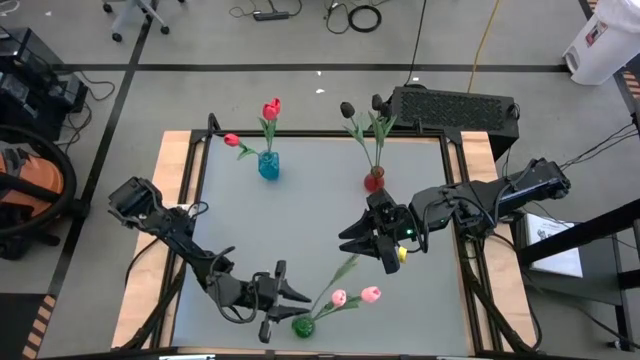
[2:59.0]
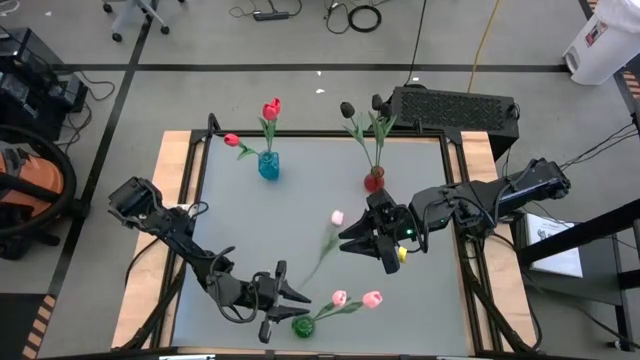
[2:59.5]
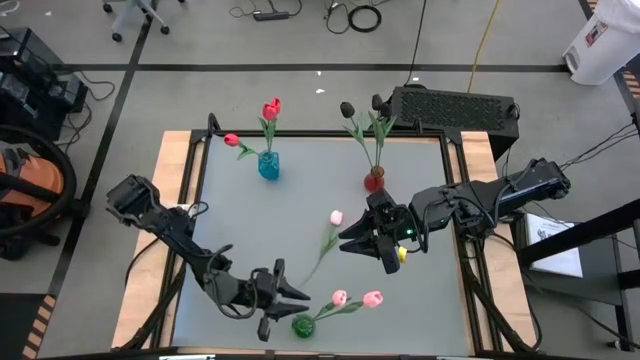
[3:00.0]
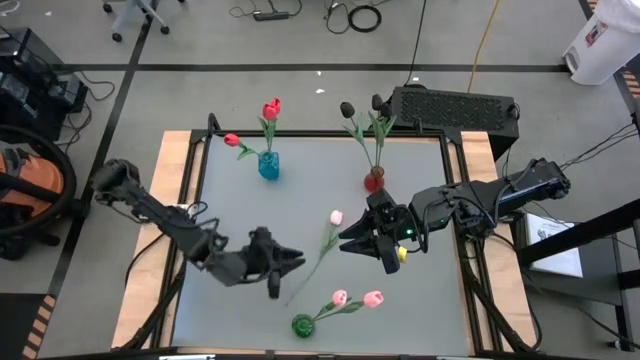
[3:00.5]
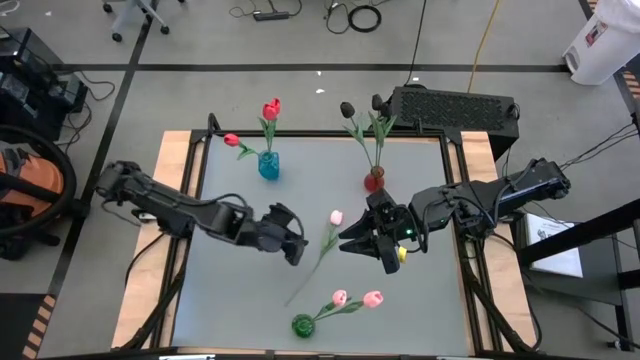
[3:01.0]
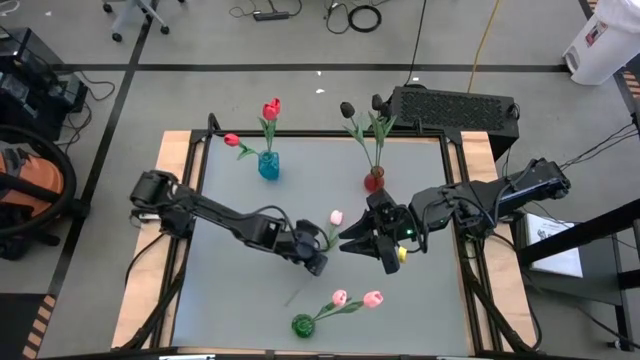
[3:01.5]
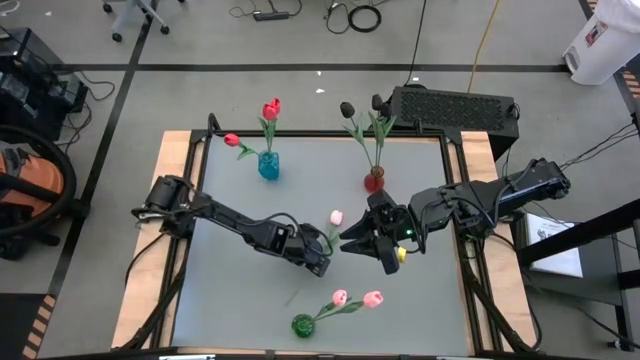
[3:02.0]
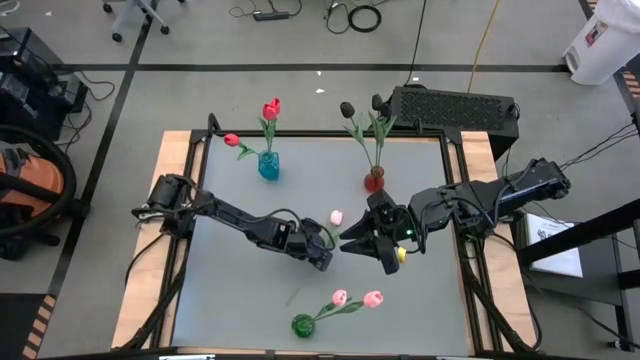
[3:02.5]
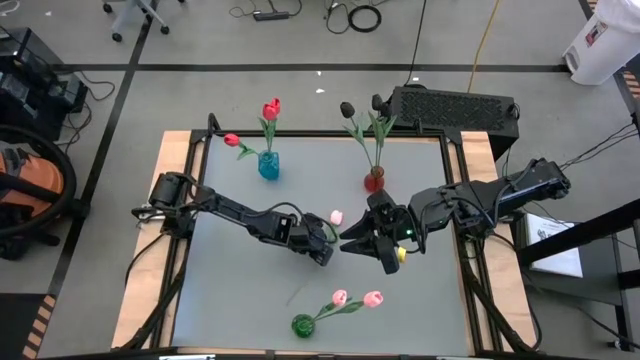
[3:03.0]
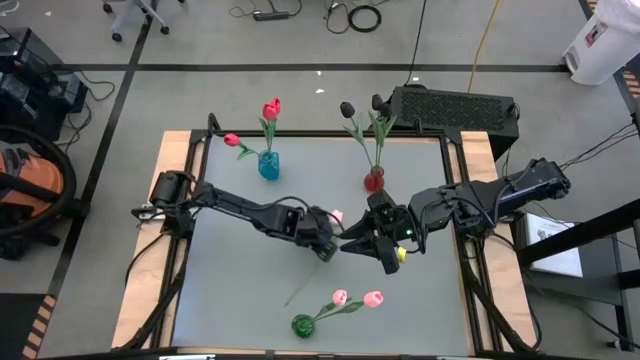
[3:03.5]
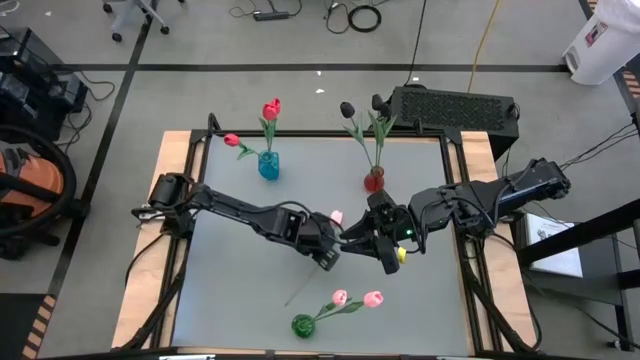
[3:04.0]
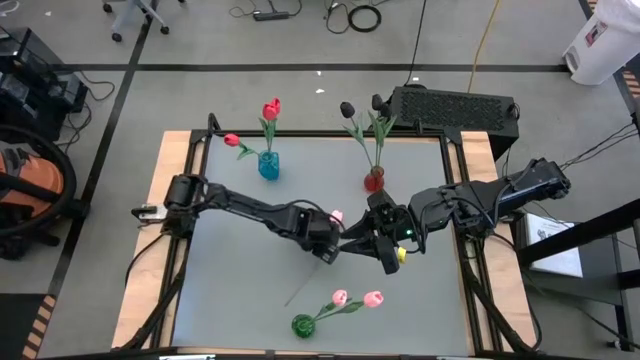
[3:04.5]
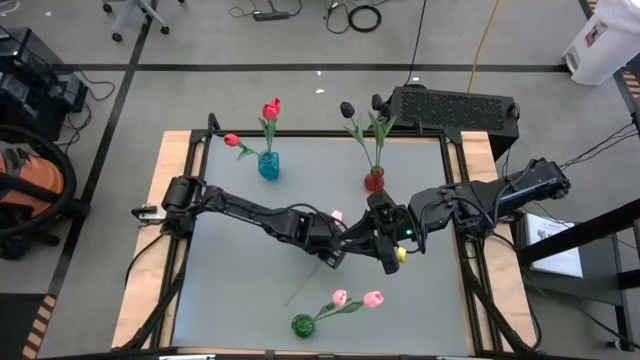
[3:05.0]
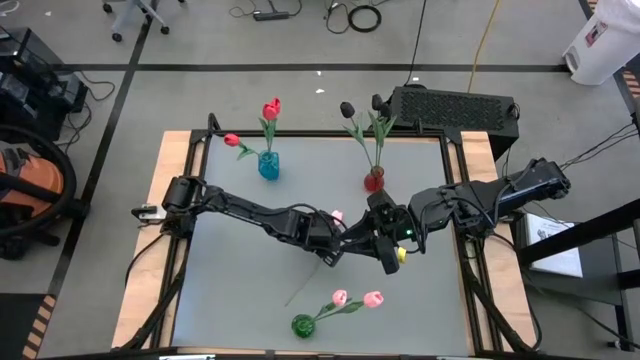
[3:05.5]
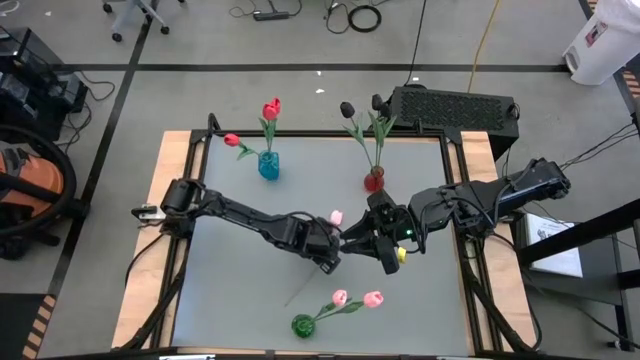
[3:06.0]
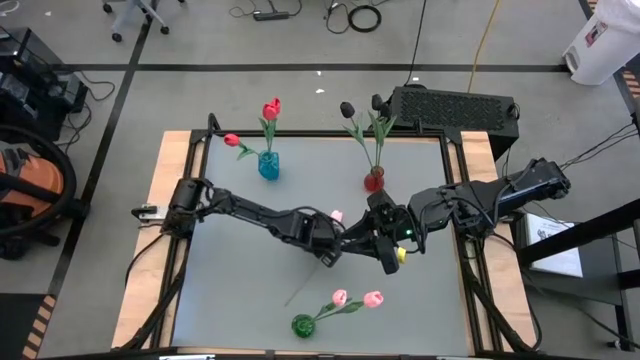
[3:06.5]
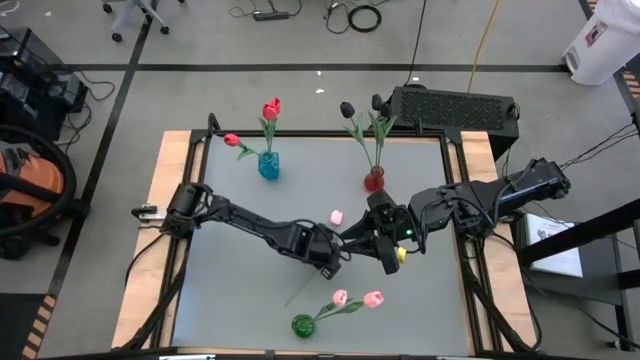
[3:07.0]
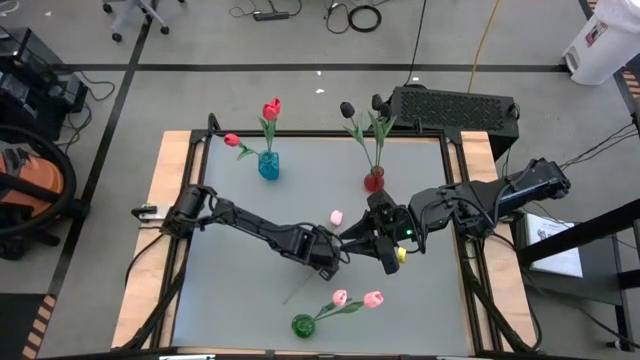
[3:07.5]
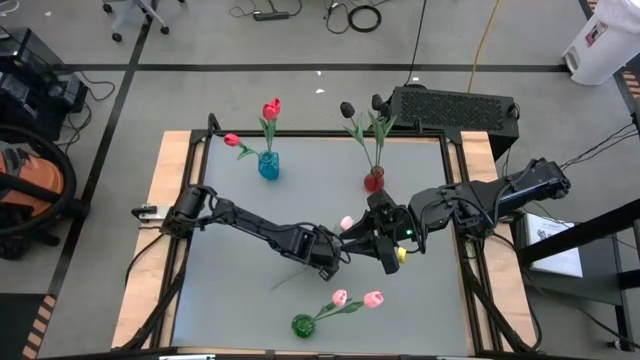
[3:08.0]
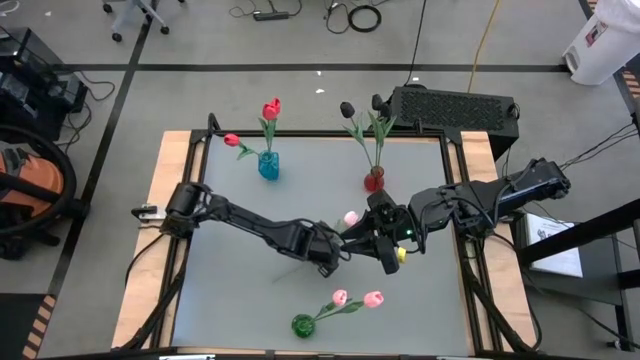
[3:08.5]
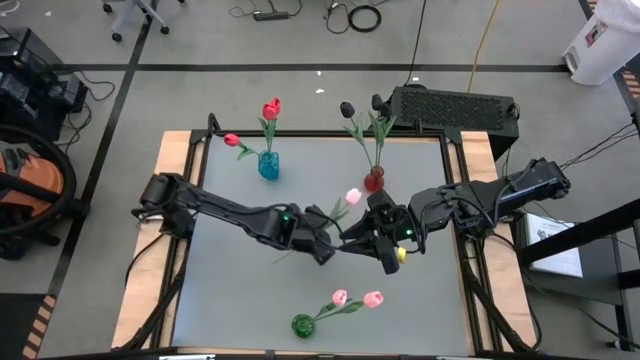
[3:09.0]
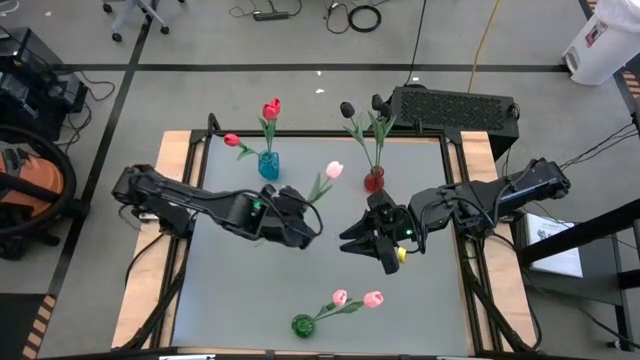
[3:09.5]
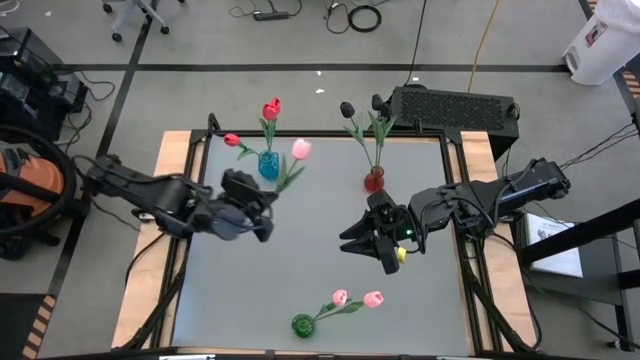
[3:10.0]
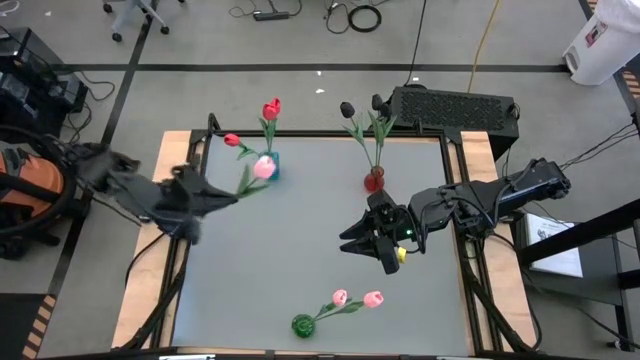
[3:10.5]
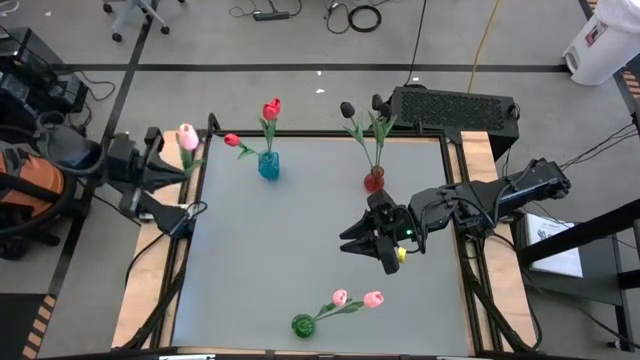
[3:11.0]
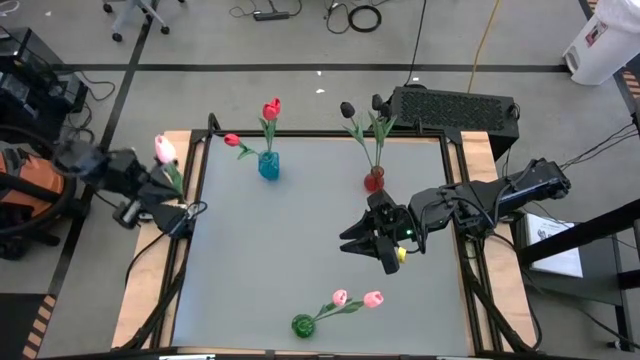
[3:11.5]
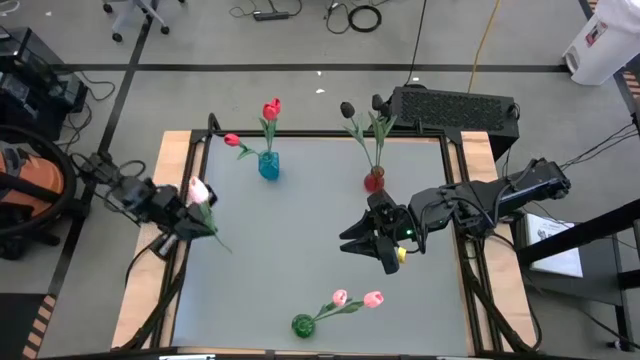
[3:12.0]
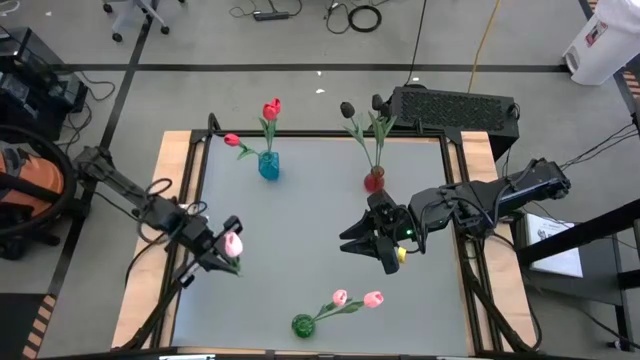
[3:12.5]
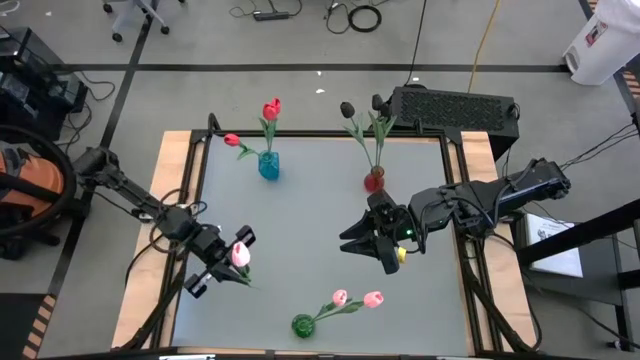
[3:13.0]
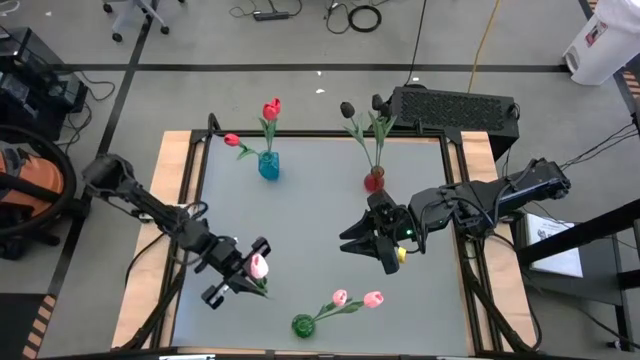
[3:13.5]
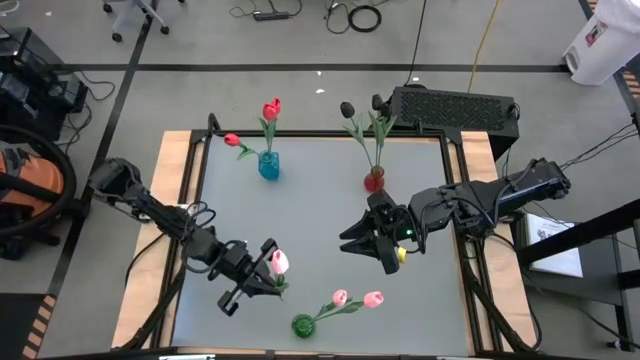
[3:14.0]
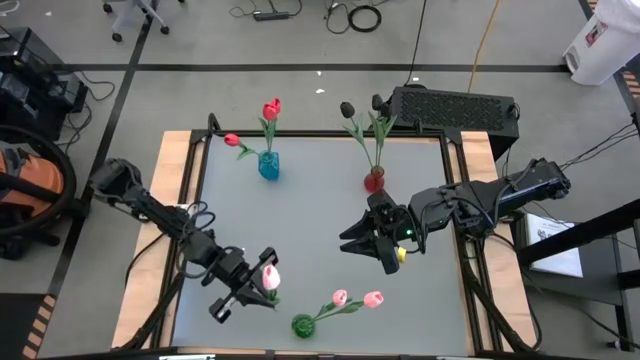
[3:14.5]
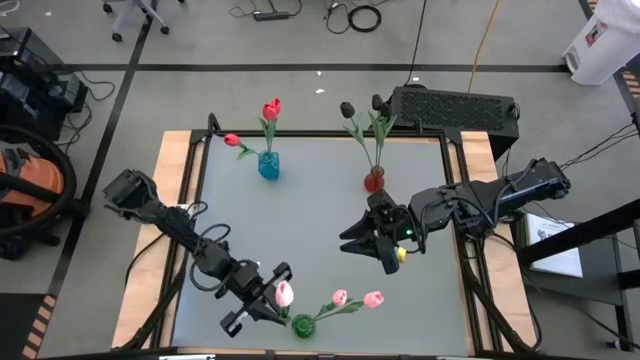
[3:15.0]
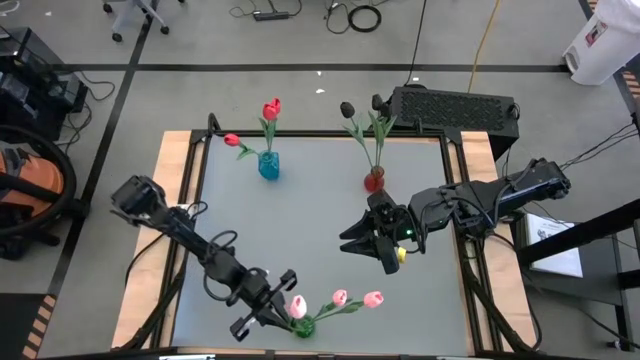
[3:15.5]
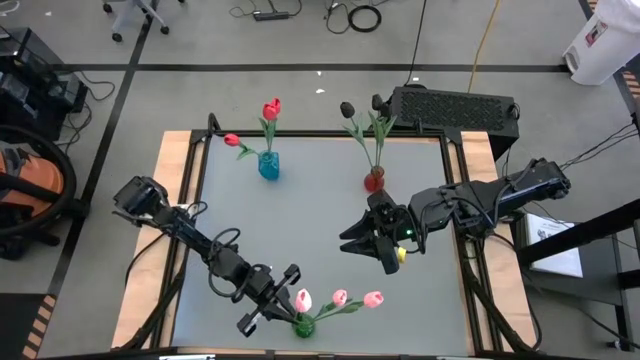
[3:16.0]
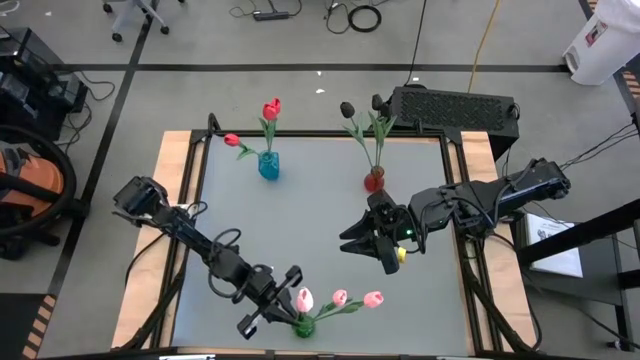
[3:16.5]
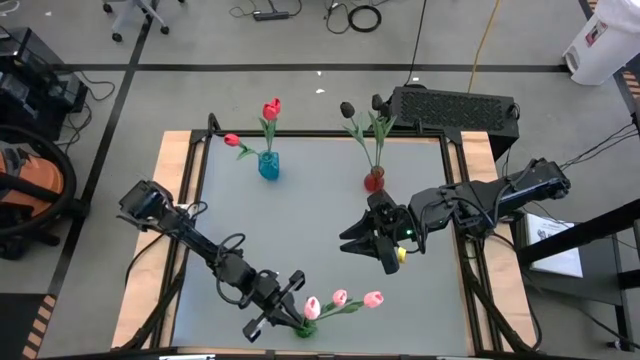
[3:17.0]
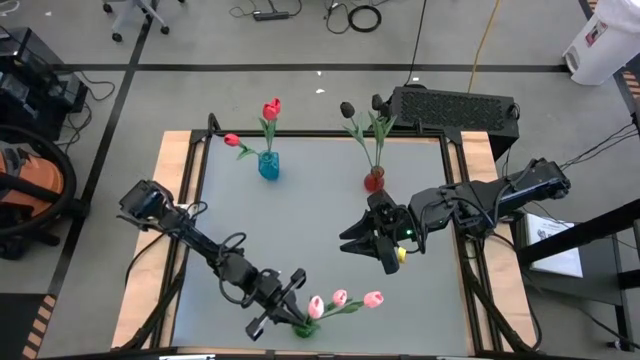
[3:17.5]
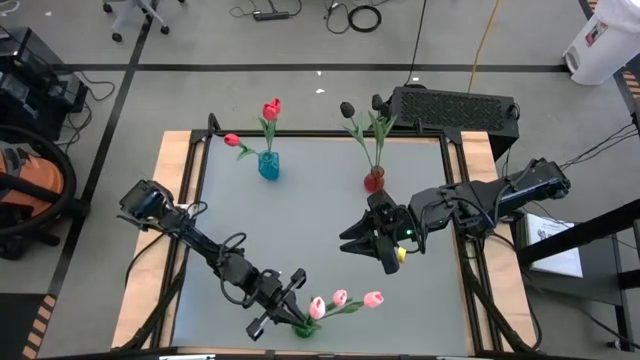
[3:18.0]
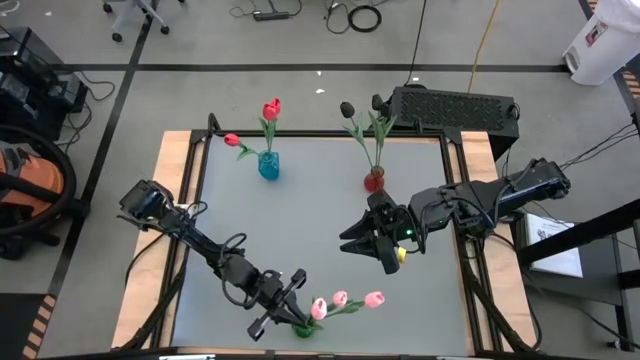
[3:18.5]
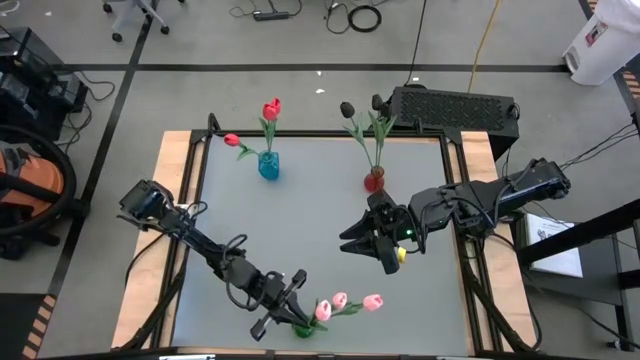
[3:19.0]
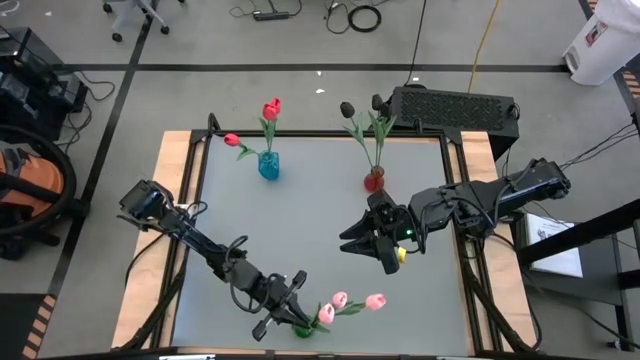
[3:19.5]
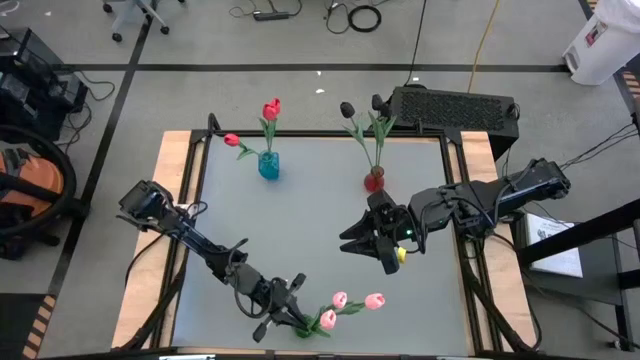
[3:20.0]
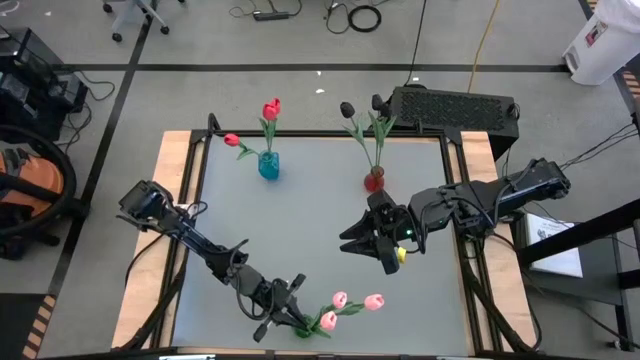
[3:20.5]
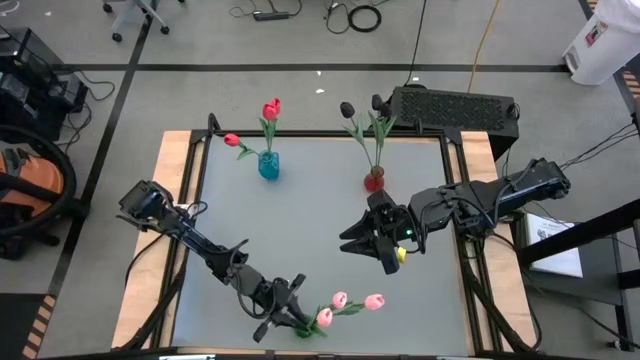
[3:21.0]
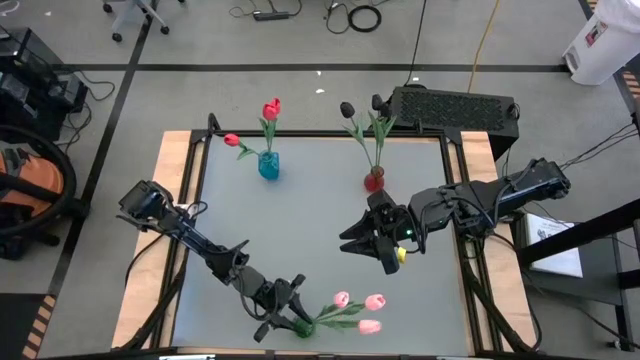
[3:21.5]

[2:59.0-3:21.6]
Task: Sort flowers into vase by color
Put the pink tulip into the green vase
